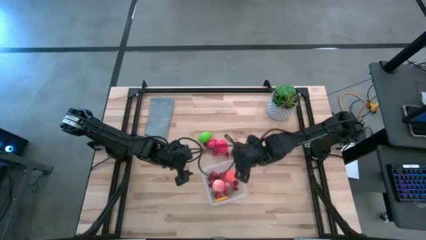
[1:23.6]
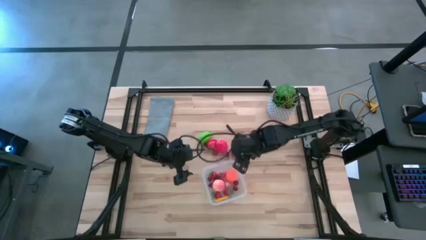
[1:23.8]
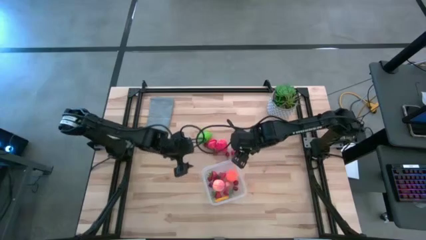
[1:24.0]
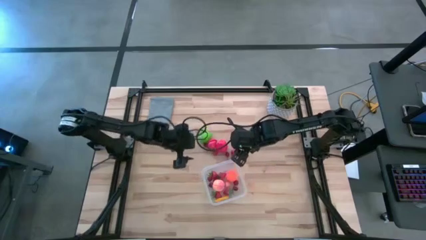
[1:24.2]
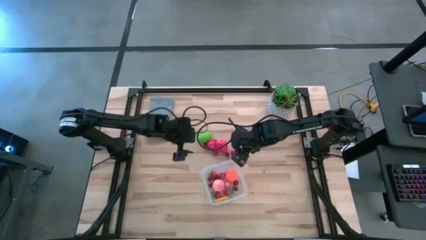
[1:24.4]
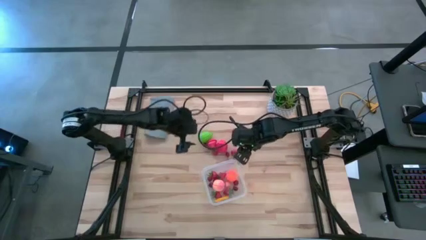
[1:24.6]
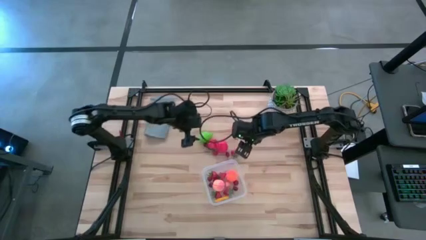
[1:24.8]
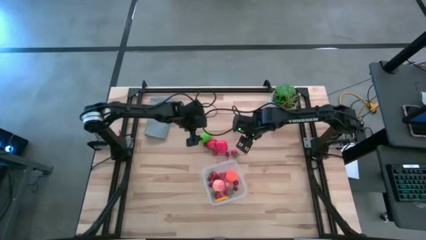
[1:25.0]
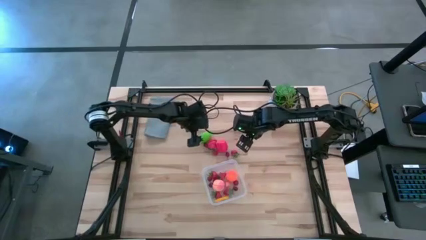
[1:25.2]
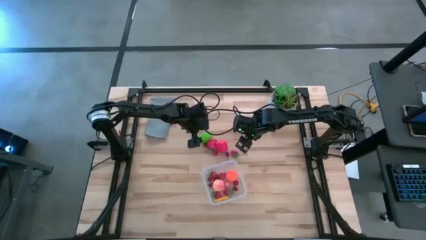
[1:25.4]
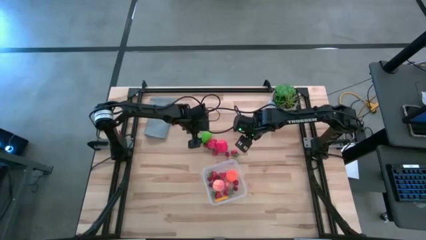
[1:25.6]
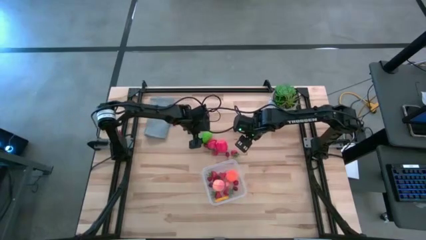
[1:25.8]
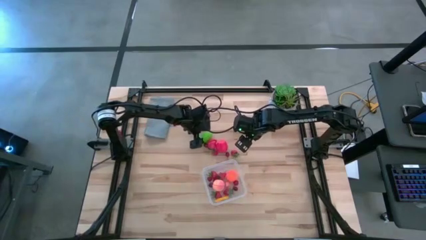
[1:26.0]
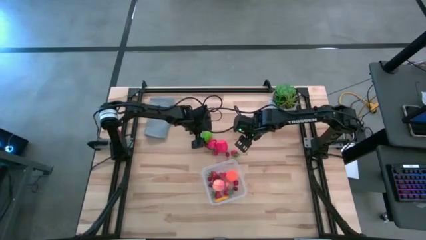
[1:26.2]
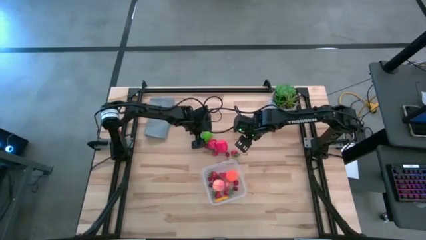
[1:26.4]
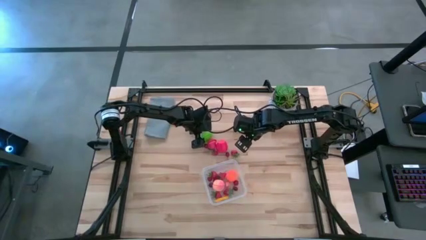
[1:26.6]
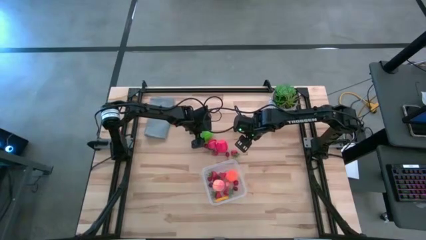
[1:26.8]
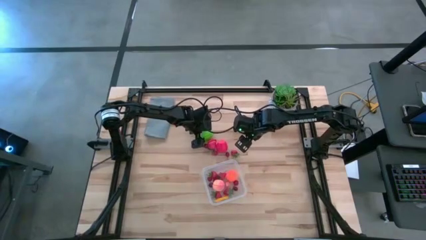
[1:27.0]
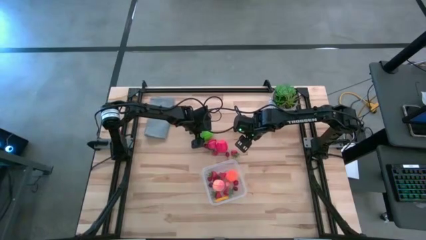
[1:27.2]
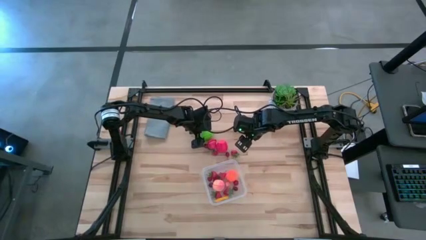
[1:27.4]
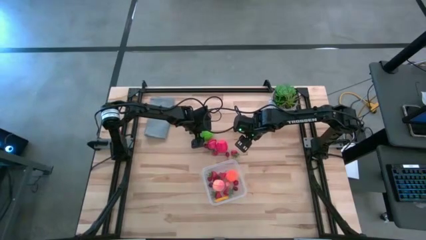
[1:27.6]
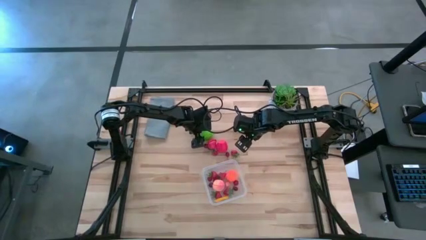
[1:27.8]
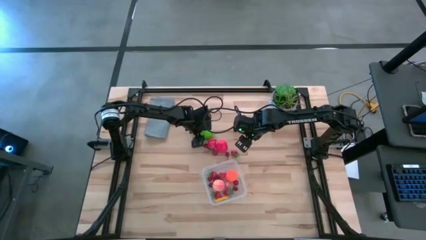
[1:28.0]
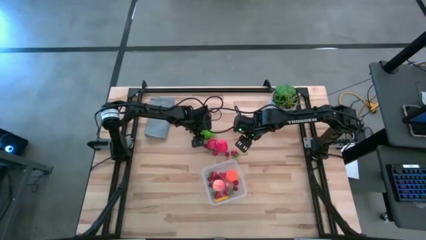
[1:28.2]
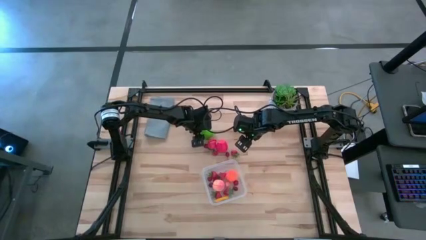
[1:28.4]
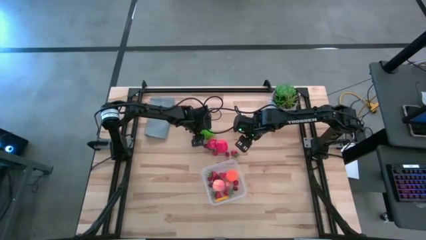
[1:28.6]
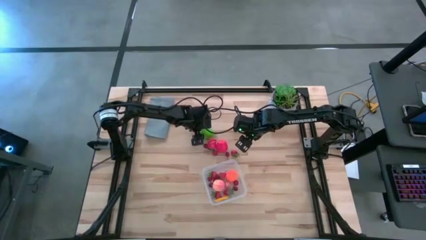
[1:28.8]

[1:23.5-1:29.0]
Task: Pick and placing Produce into tupperware
Put the green melon into the transparent bin

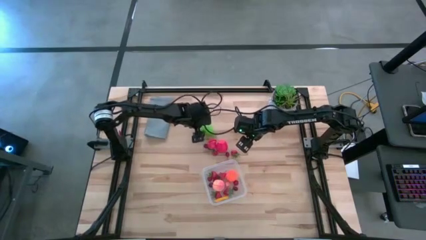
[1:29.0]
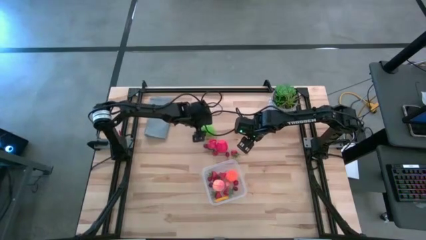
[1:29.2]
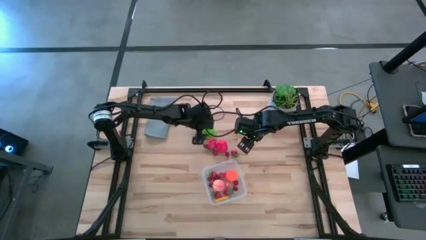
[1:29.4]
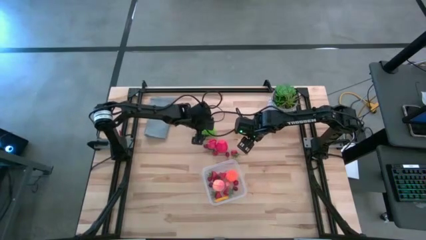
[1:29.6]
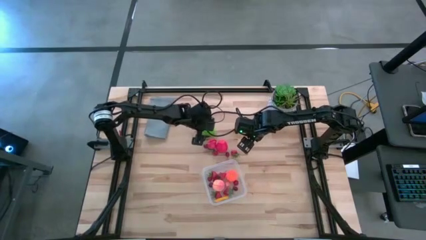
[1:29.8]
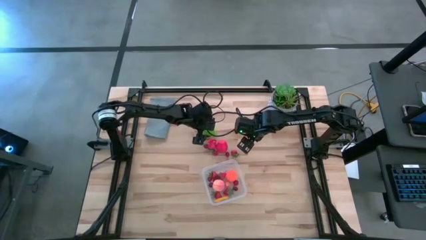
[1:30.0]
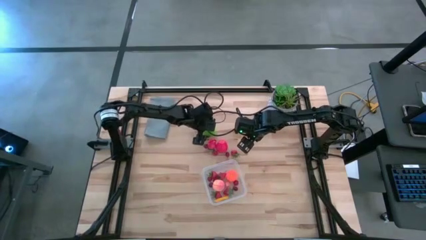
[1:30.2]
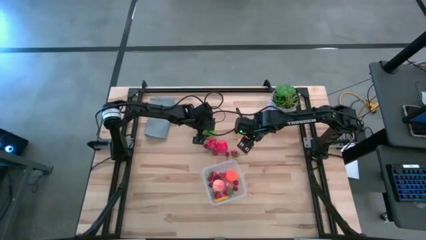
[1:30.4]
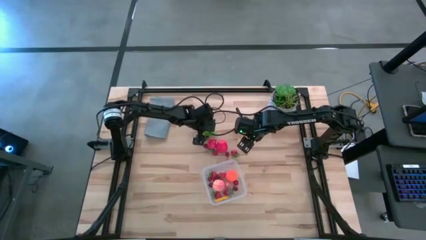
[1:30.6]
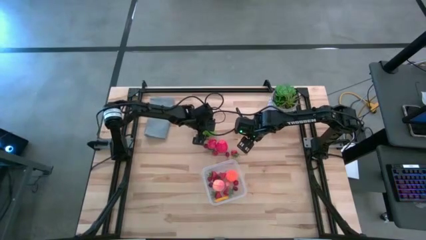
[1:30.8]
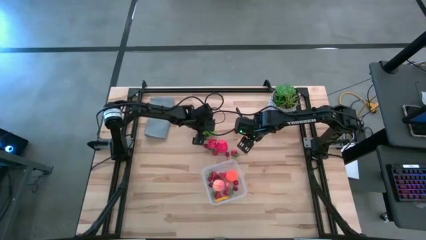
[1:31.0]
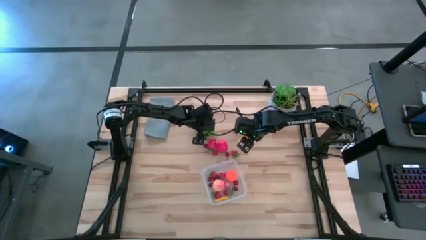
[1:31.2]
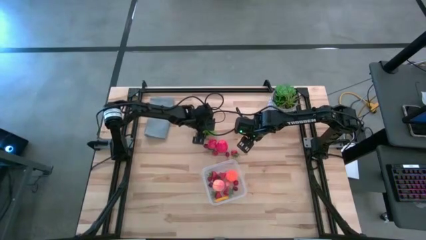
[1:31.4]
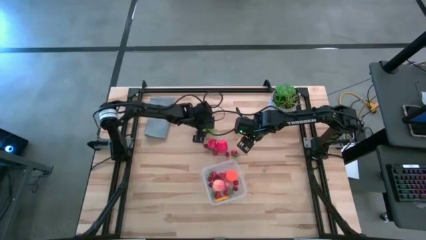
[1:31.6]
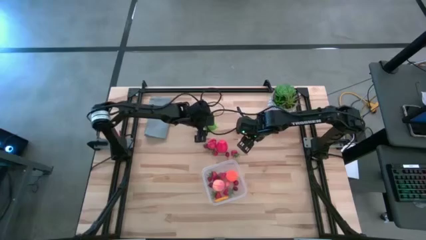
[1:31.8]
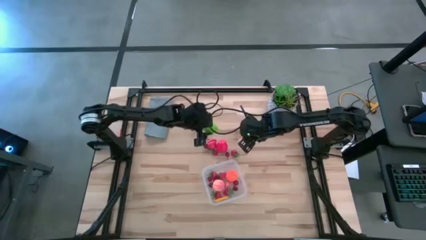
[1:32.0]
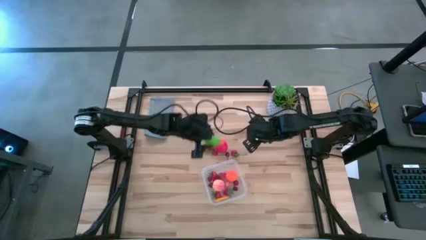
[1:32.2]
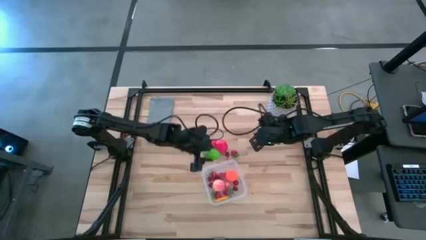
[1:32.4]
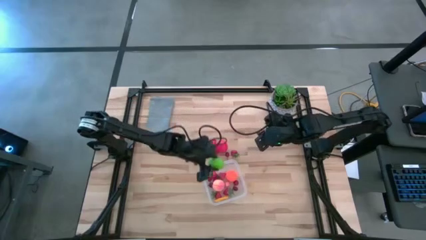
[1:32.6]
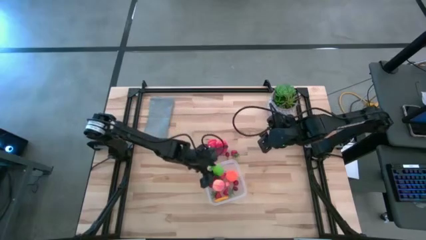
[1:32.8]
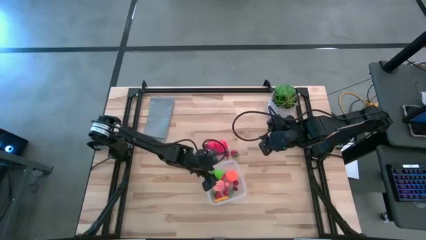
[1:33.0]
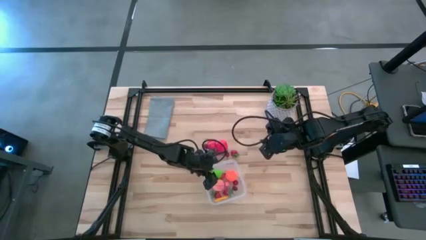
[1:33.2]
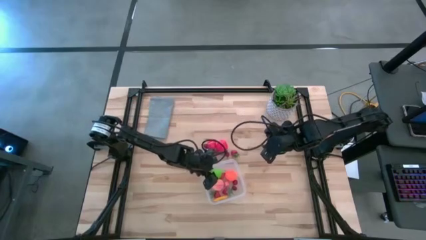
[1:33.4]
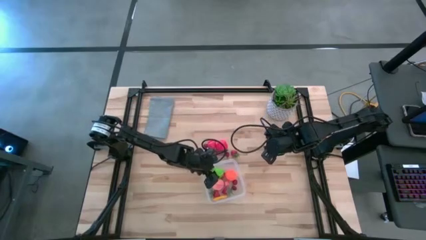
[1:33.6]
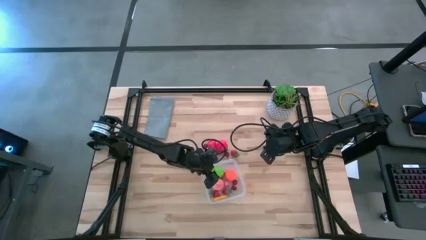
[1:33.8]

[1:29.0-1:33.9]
Put the green melon into the transparent bin

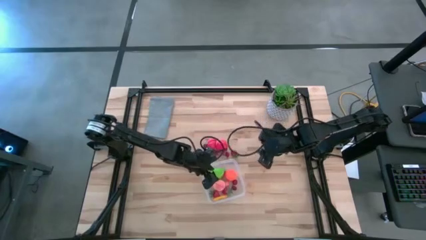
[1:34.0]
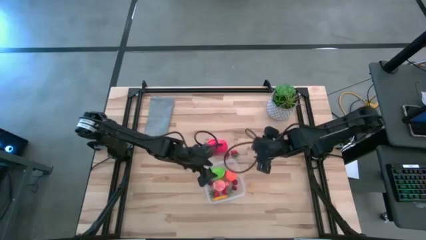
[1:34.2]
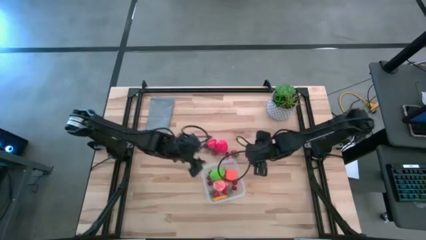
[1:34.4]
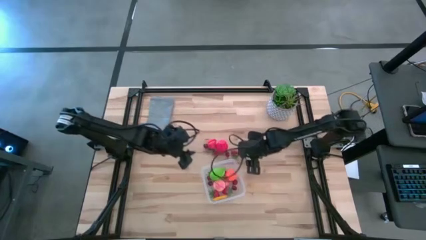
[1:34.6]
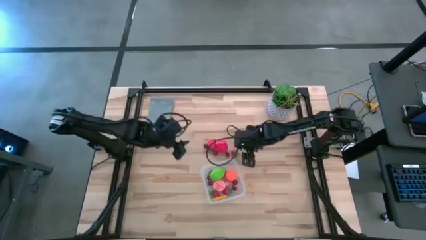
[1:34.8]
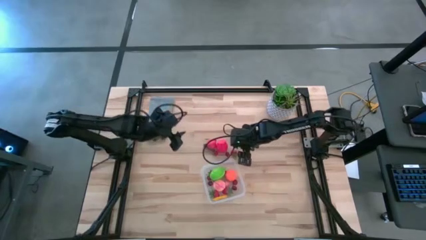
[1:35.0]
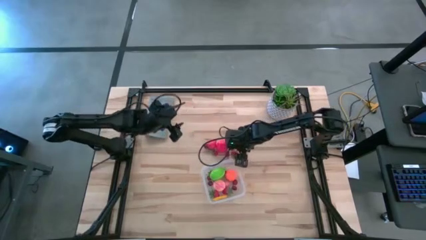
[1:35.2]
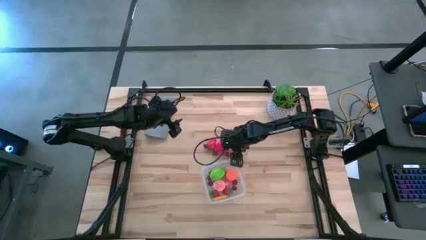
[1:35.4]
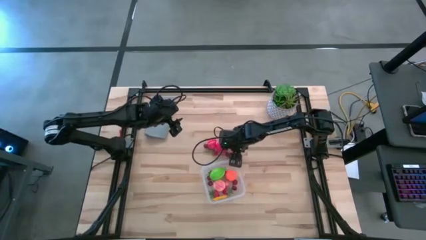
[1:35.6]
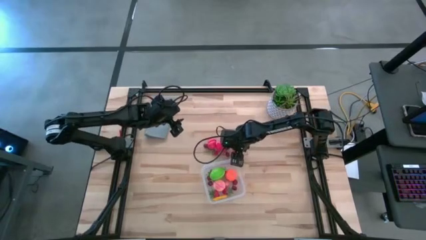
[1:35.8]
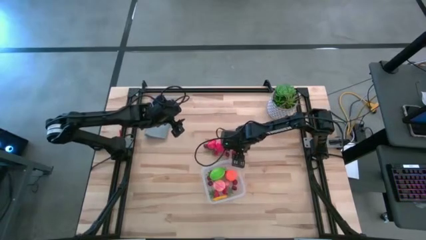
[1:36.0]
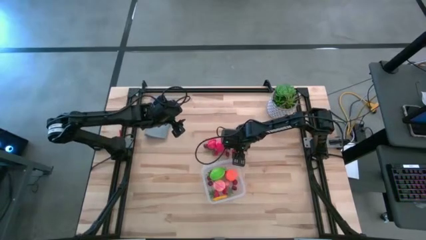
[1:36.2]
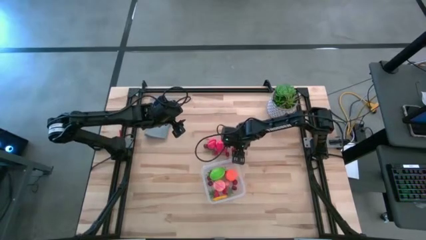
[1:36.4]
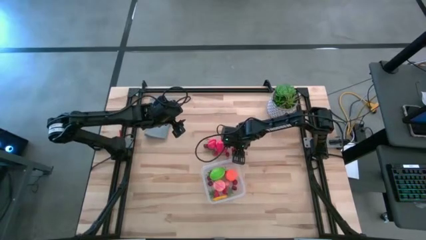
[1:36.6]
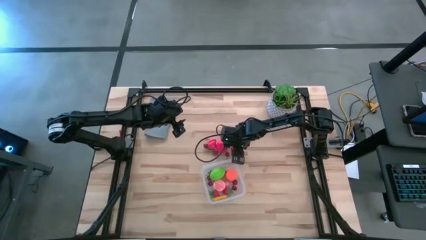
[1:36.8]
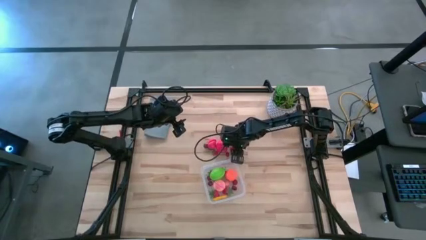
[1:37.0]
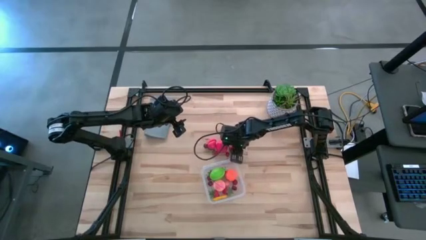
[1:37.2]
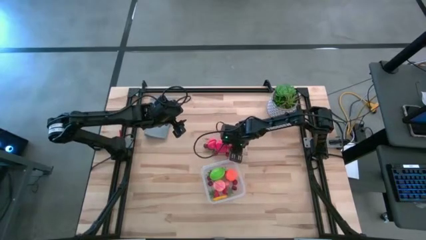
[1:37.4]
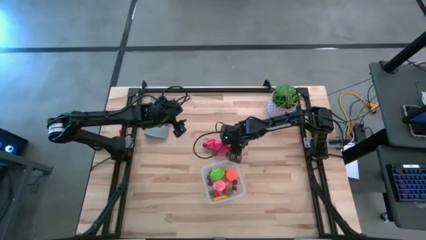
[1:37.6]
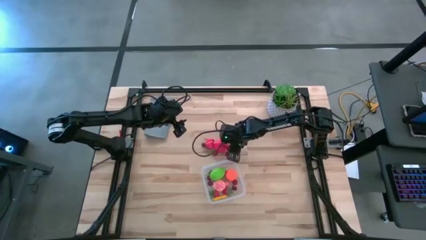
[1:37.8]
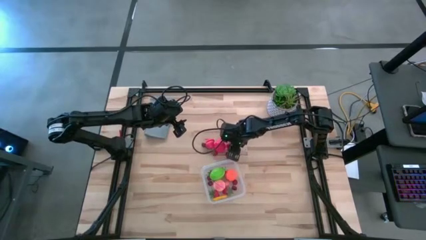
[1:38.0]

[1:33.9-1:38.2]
Put the red strawberry into the transparent bin

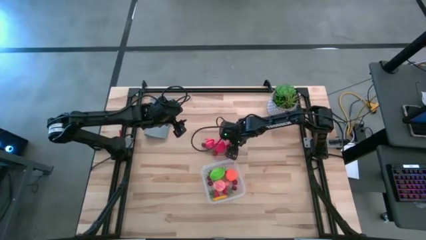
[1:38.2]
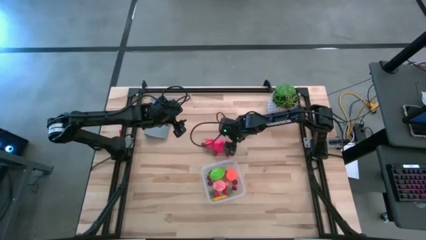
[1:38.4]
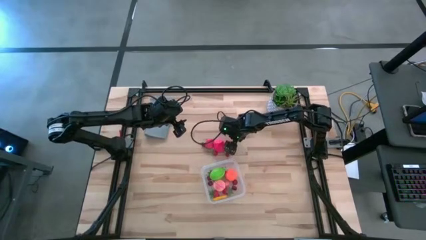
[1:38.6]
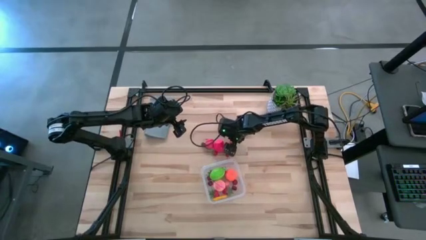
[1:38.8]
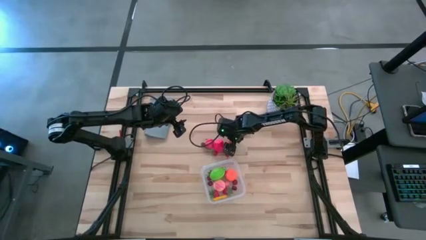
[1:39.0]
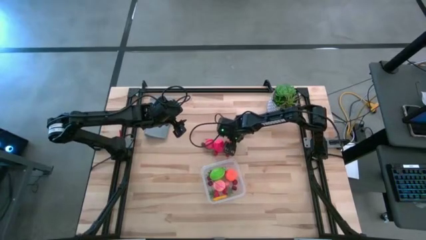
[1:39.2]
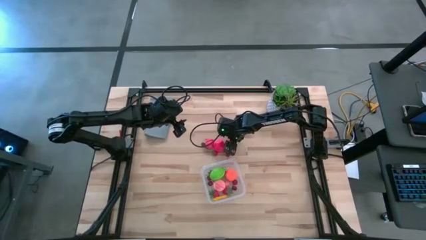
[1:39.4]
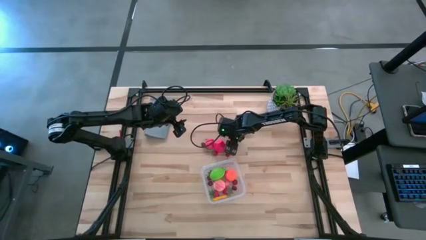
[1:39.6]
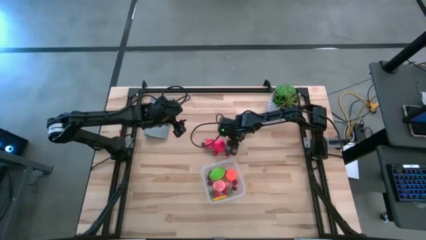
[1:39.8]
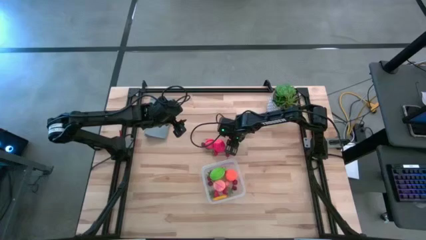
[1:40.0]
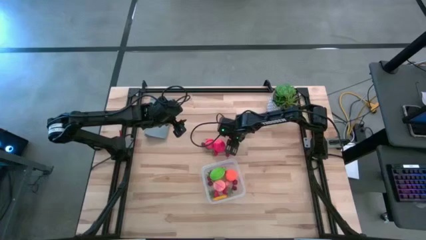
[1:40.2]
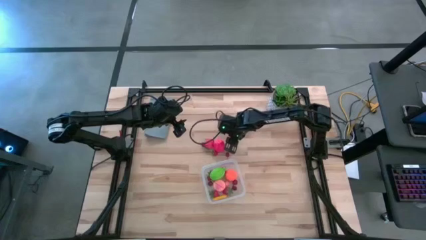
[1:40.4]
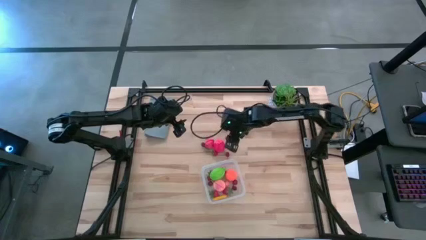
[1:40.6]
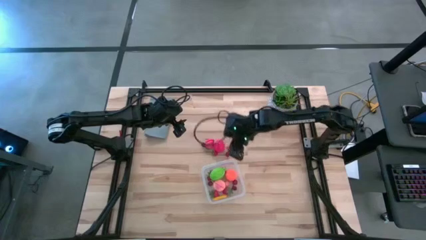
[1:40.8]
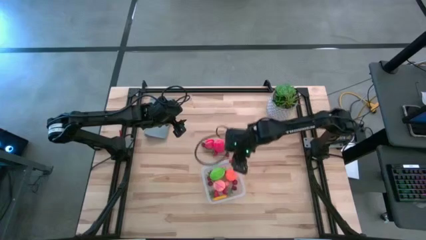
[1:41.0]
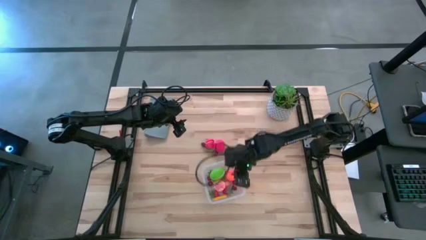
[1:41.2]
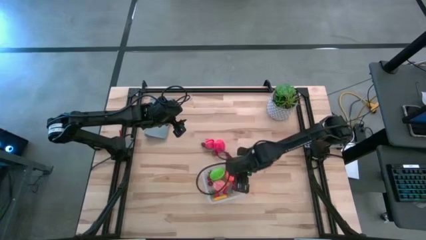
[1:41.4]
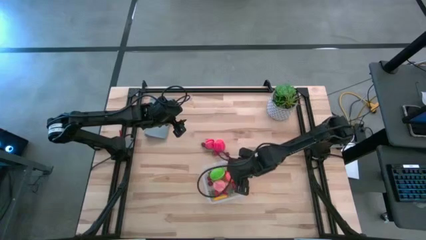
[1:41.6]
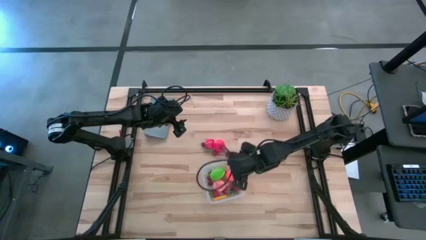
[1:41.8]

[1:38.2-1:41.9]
Put the red strawberry into the transparent bin
